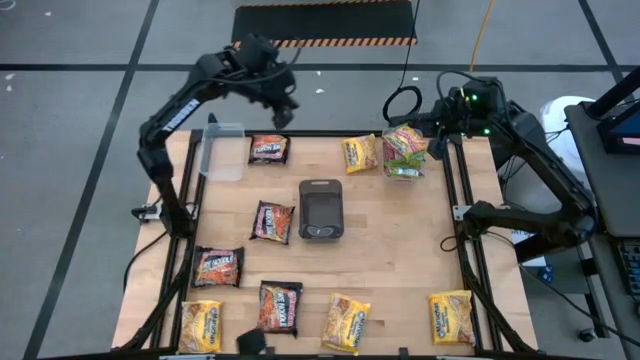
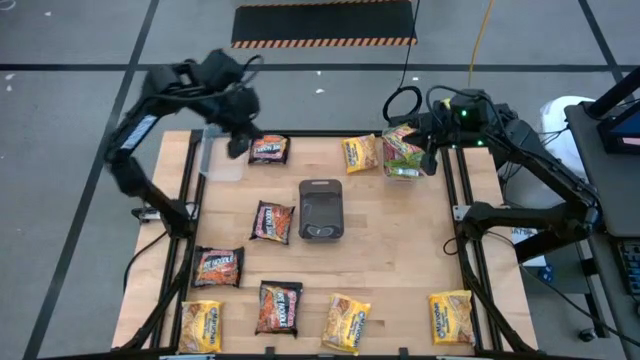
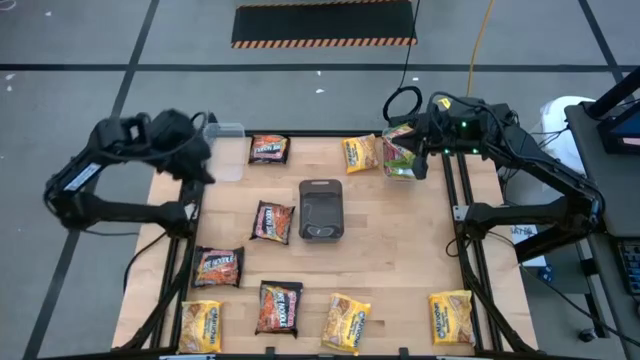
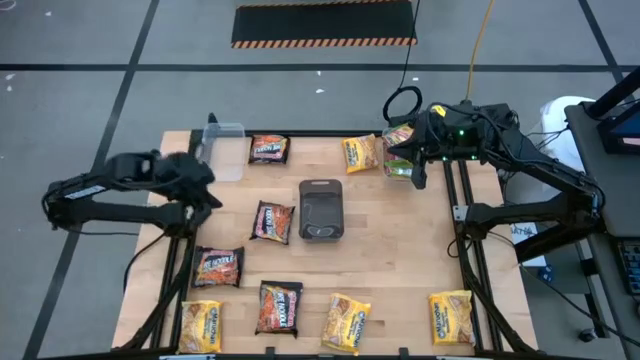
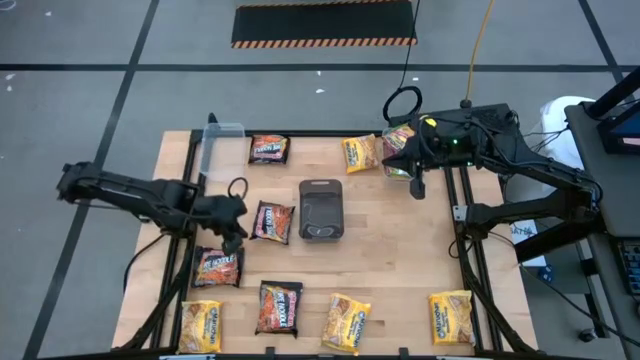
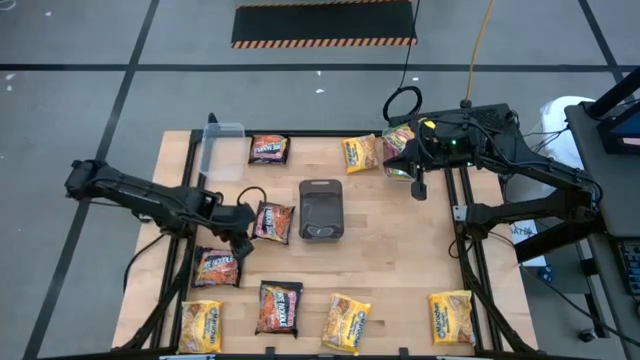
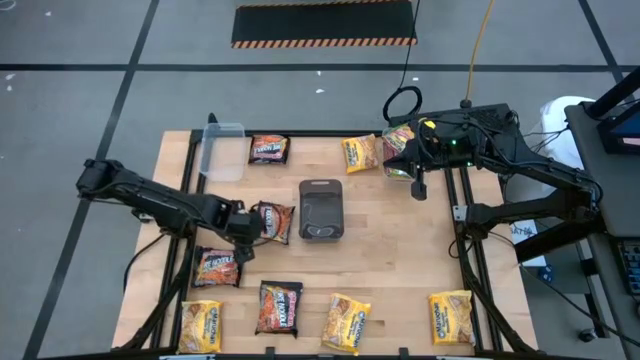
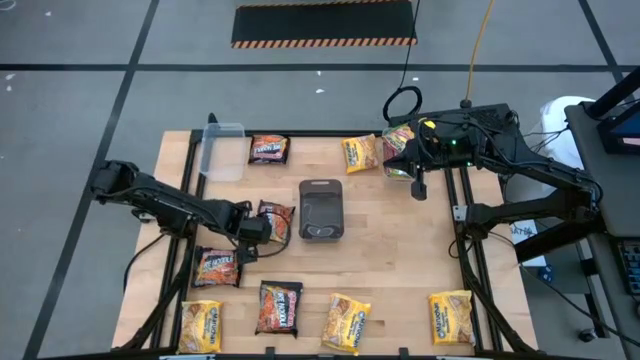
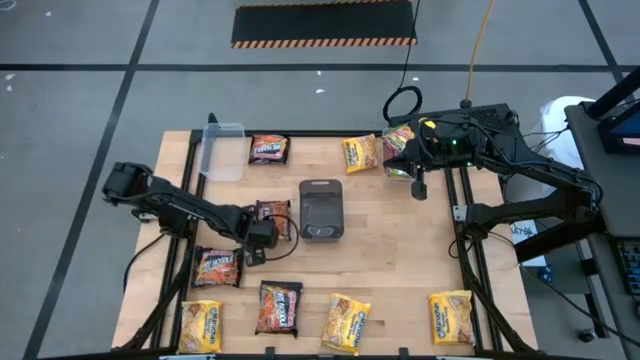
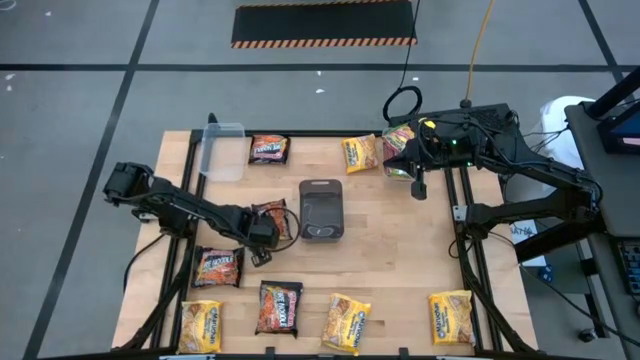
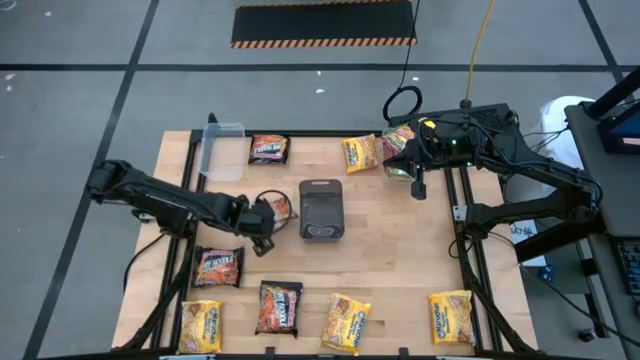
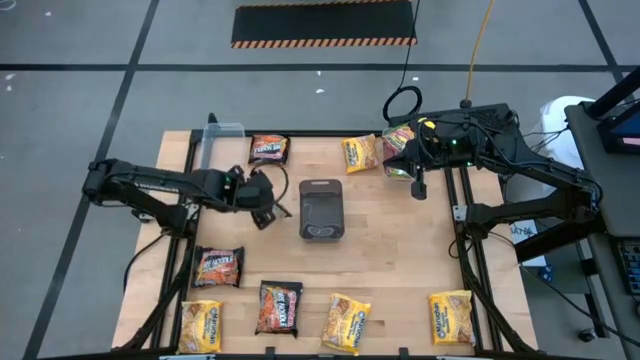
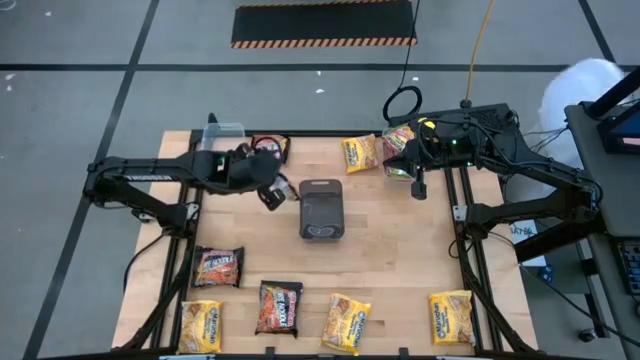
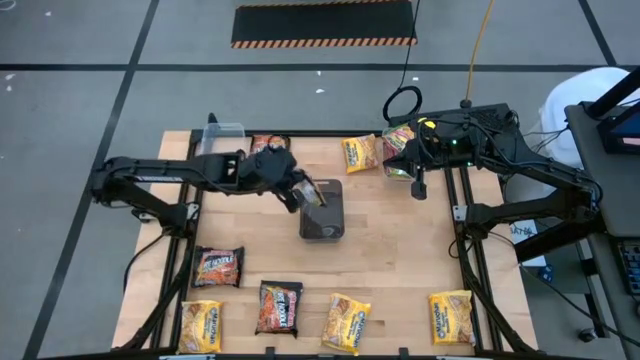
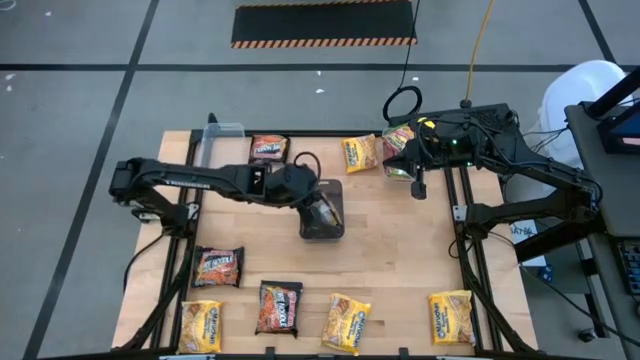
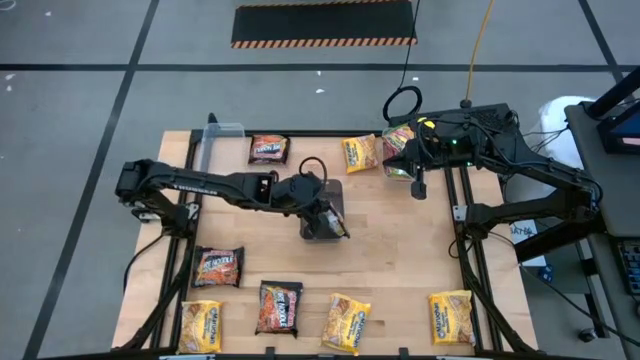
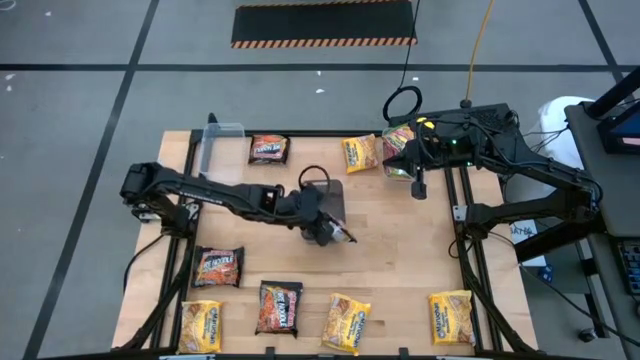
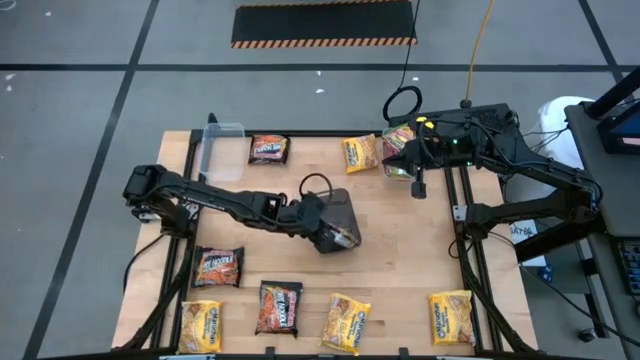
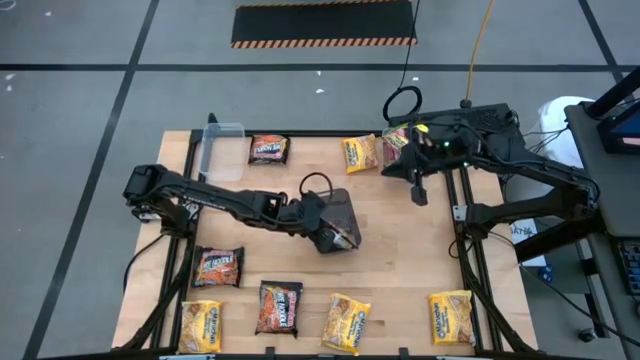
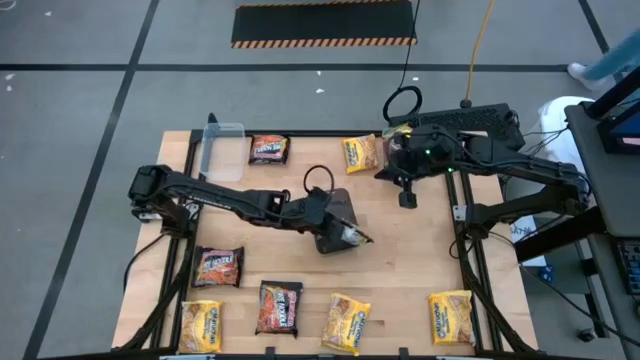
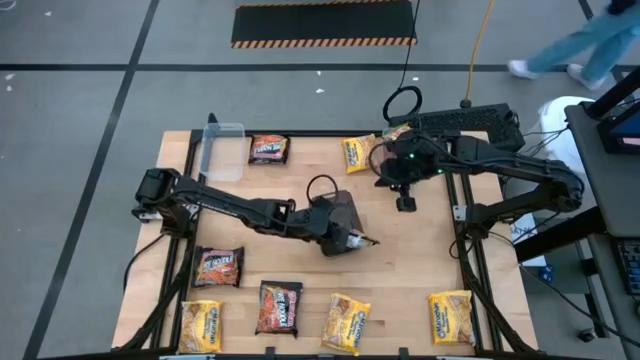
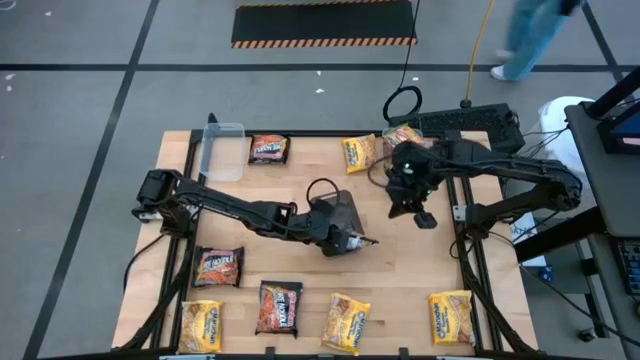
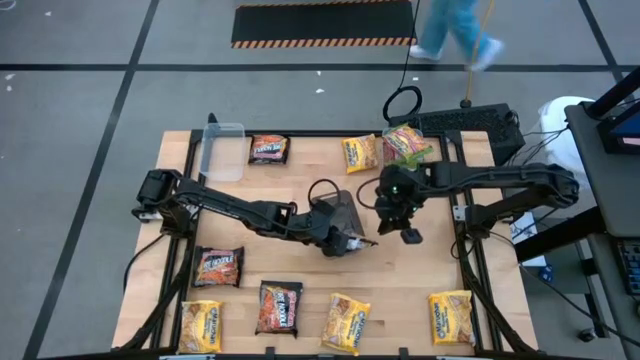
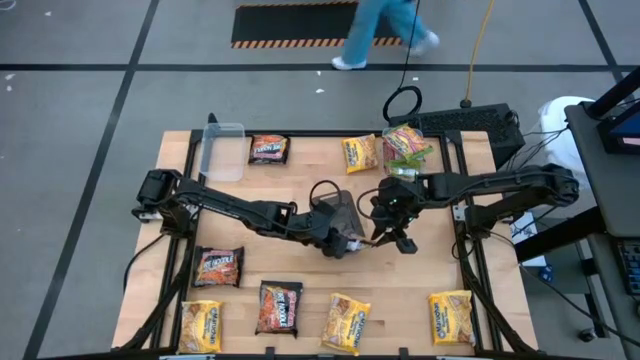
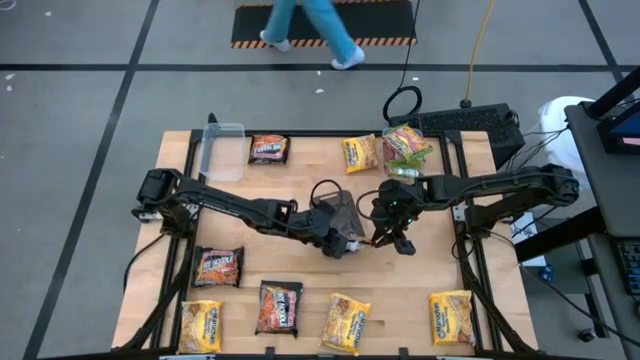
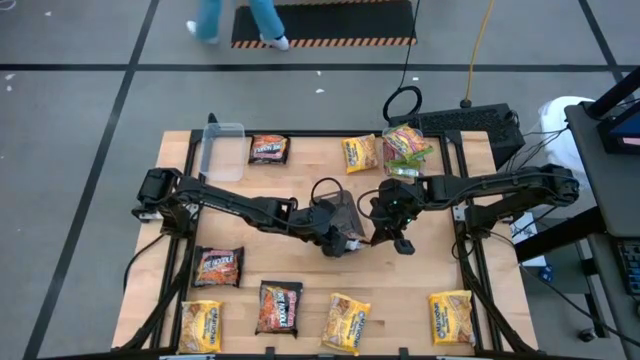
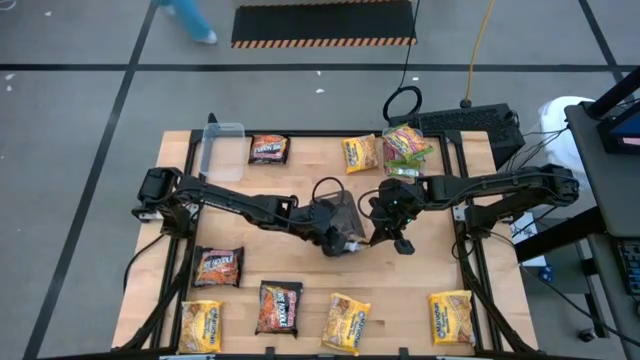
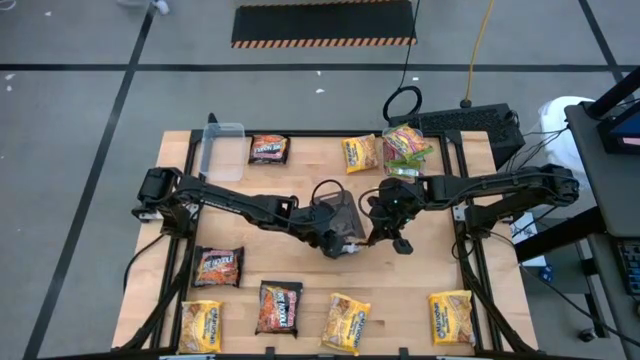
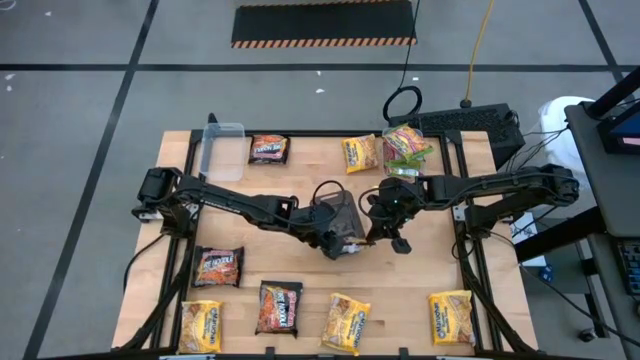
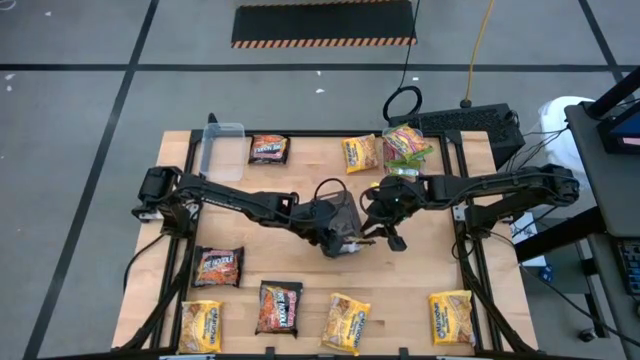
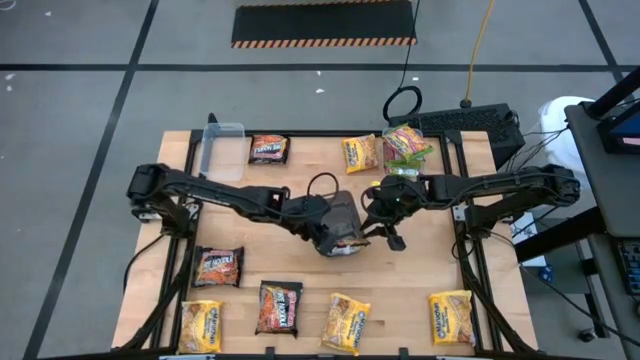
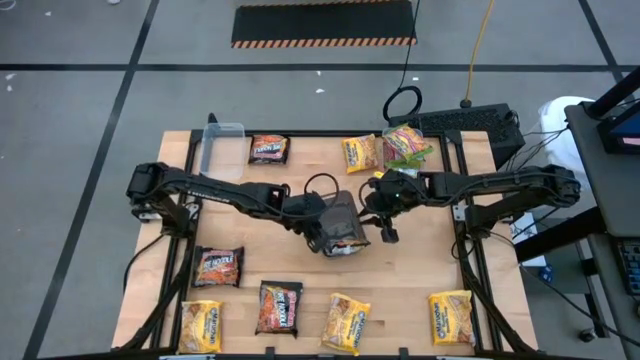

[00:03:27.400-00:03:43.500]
Task: Sort Maruchan noodles
Put the middle right black noodle pack into the black bin

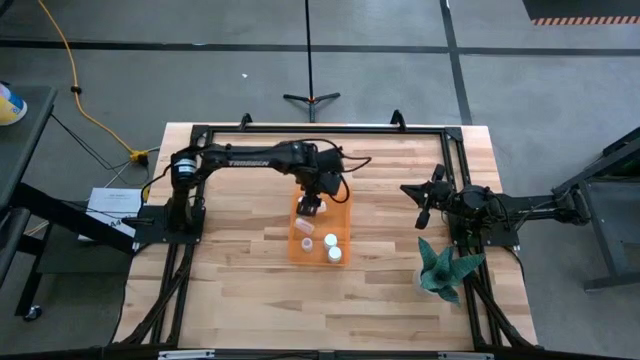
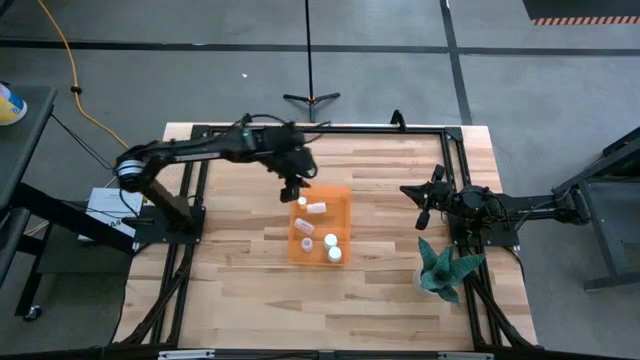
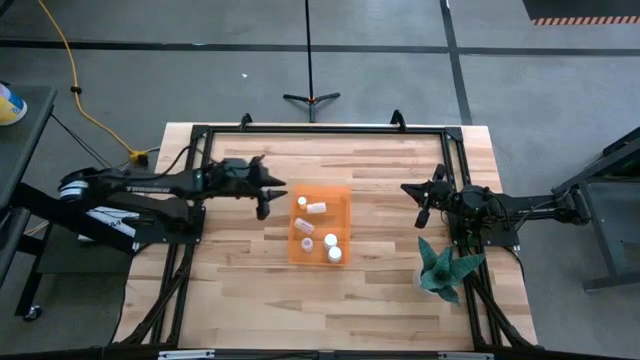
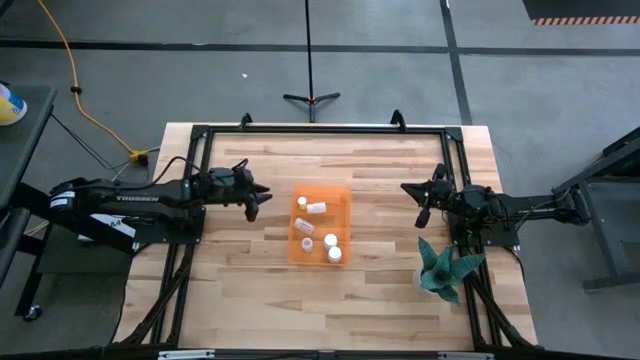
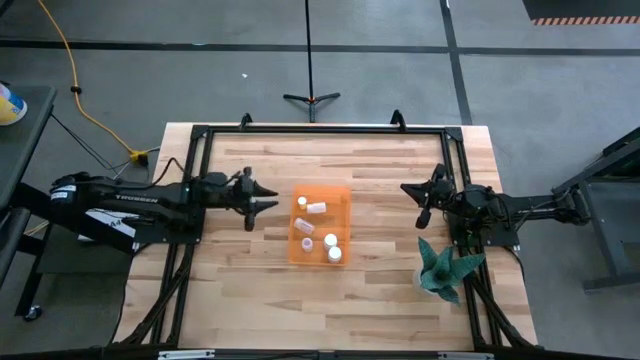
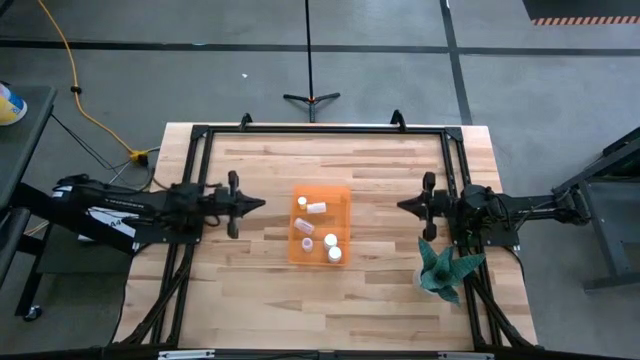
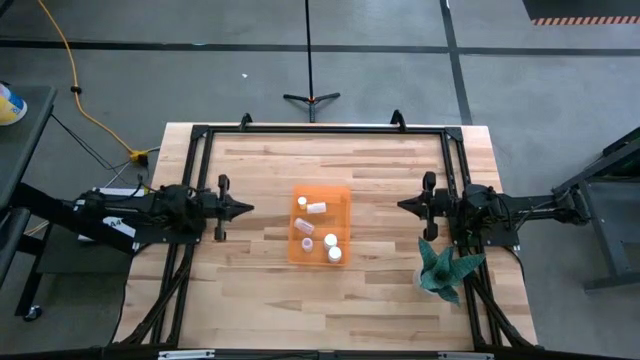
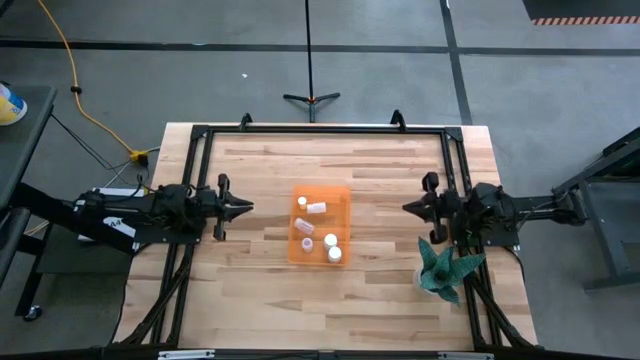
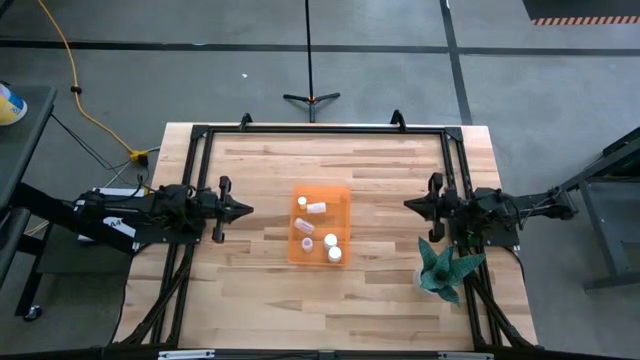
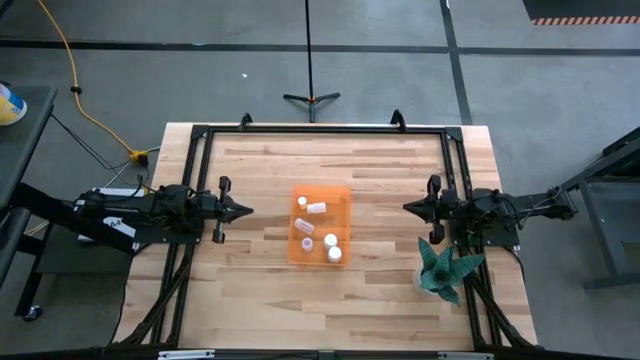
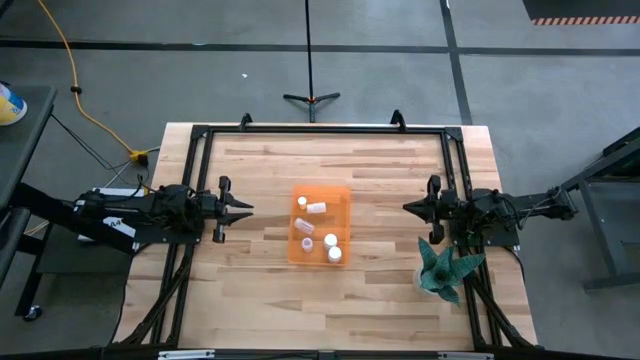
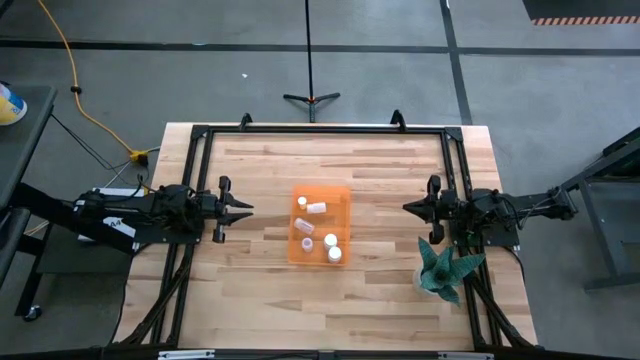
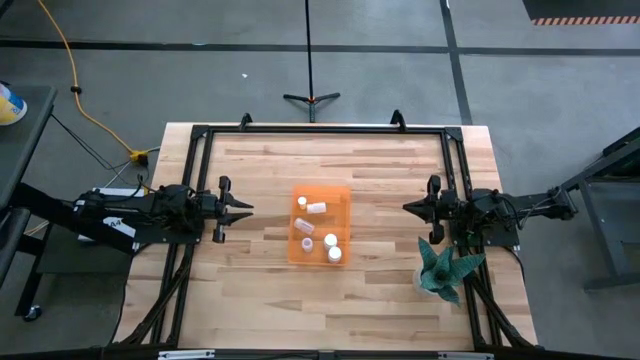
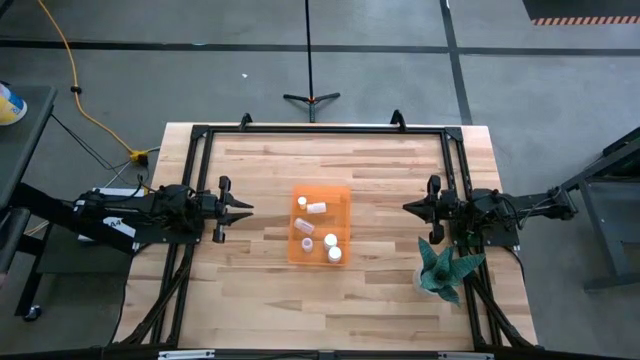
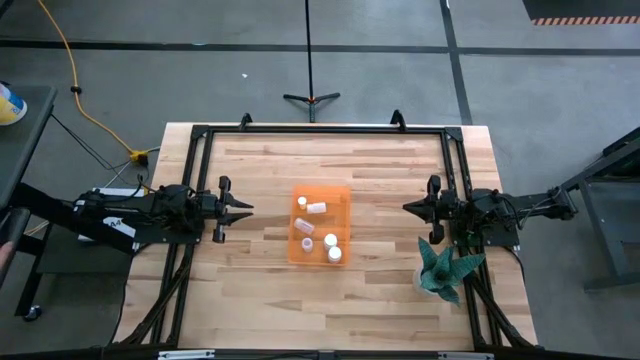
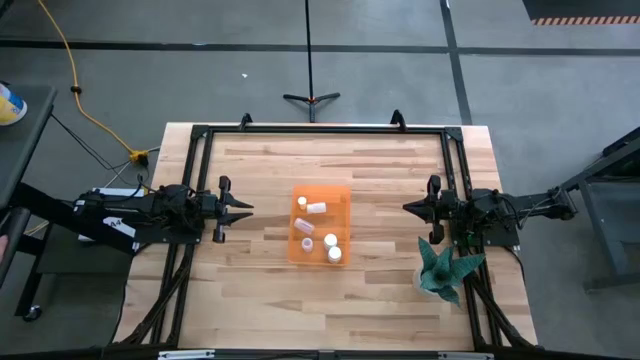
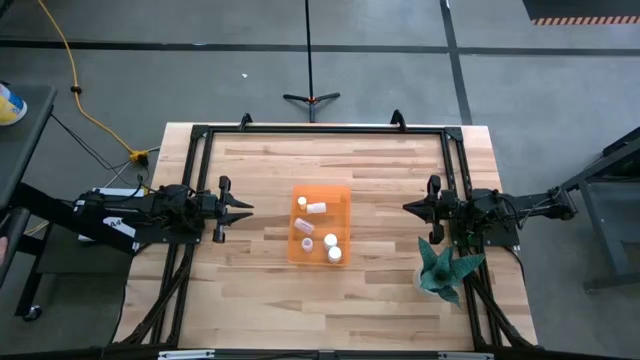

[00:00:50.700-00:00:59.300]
Task: Pick and place pill bottles into a basket
Return to Home Position
